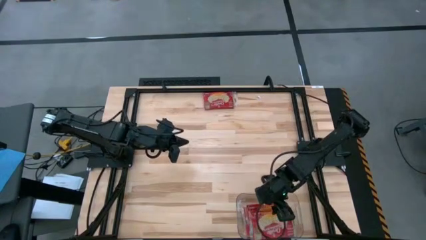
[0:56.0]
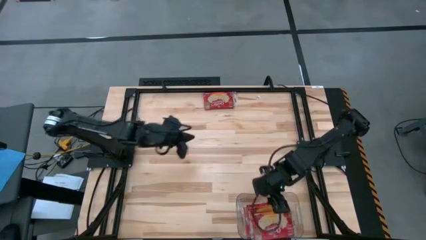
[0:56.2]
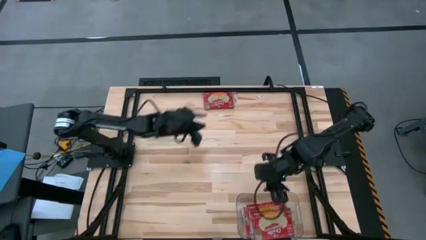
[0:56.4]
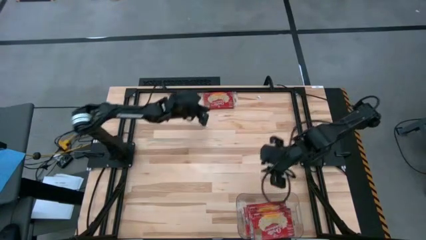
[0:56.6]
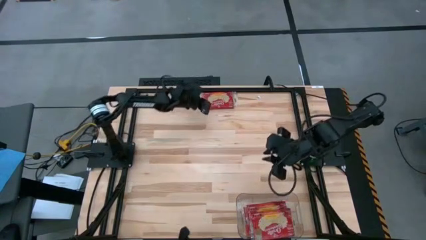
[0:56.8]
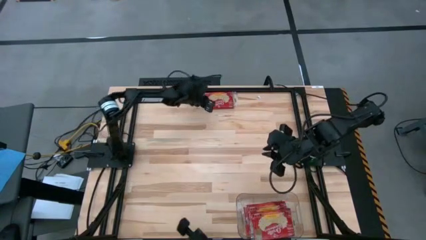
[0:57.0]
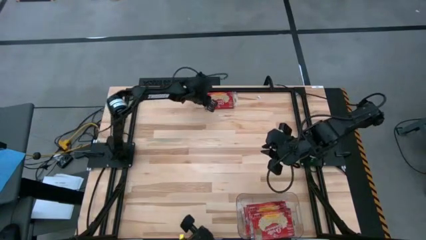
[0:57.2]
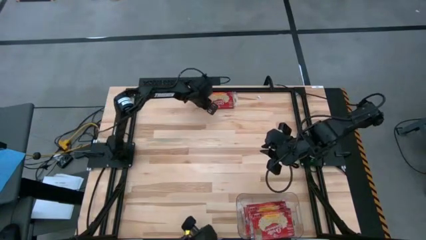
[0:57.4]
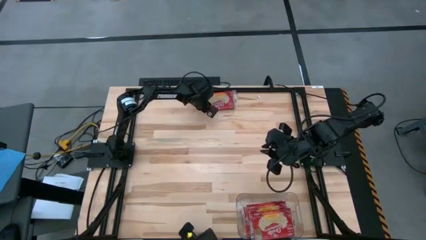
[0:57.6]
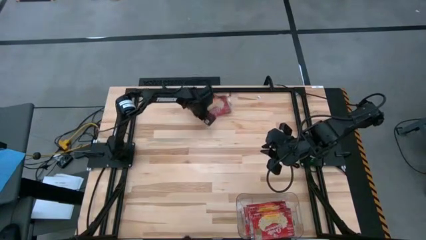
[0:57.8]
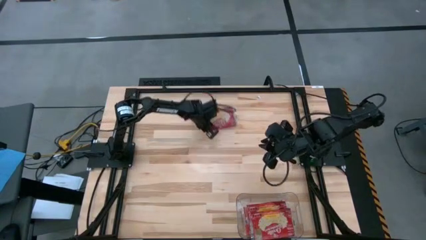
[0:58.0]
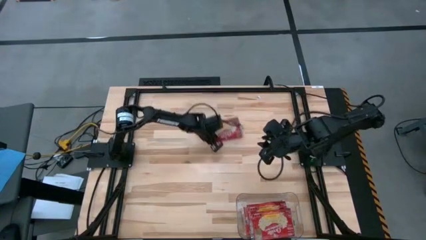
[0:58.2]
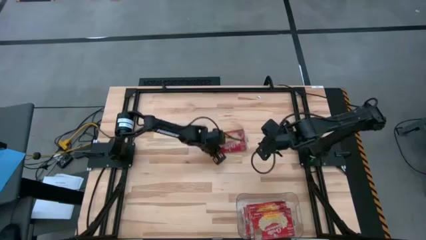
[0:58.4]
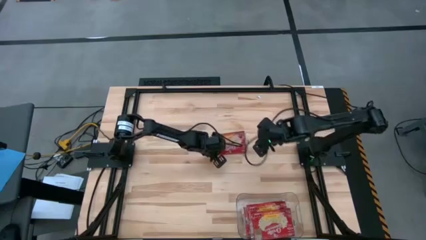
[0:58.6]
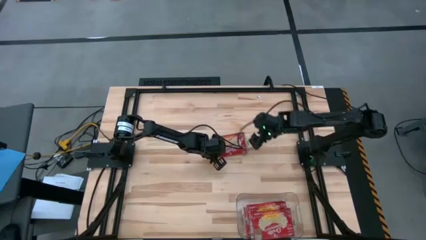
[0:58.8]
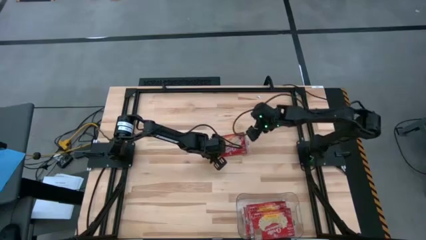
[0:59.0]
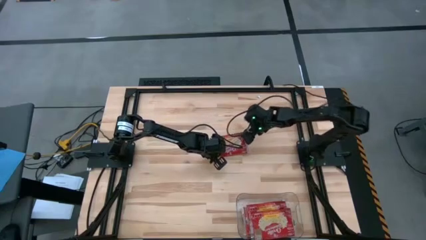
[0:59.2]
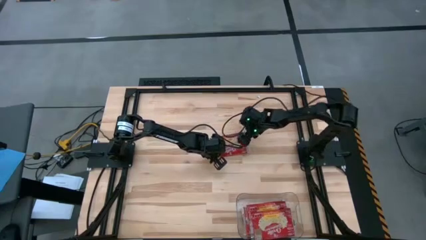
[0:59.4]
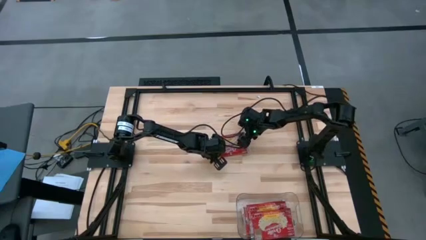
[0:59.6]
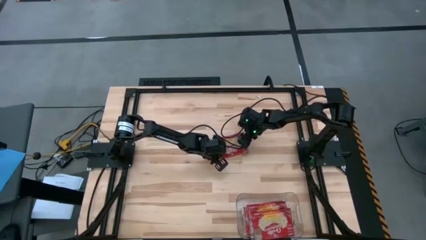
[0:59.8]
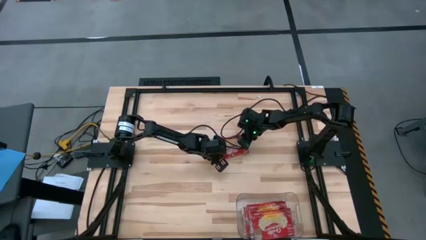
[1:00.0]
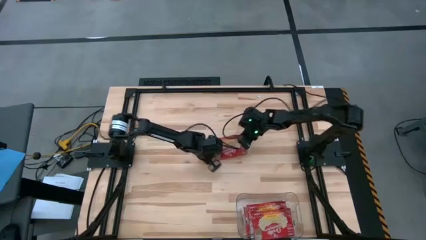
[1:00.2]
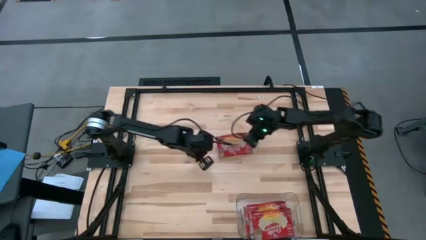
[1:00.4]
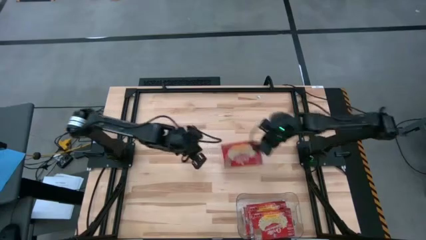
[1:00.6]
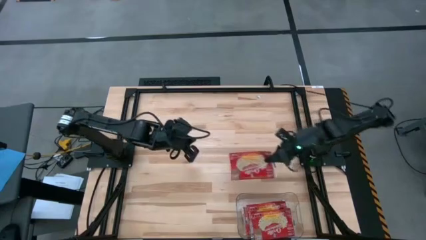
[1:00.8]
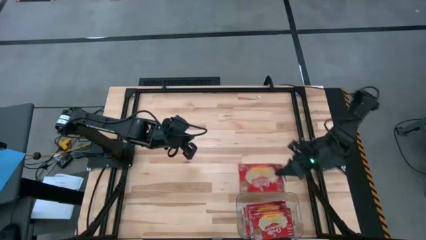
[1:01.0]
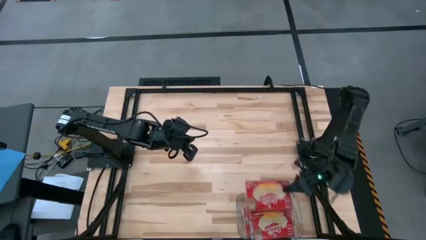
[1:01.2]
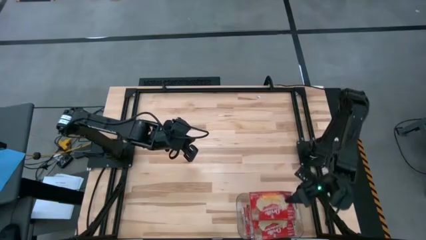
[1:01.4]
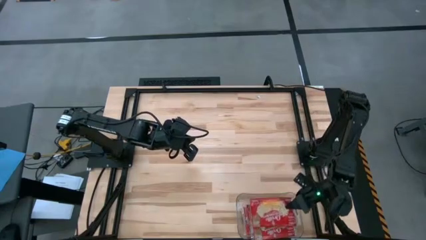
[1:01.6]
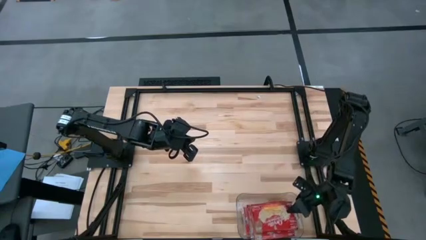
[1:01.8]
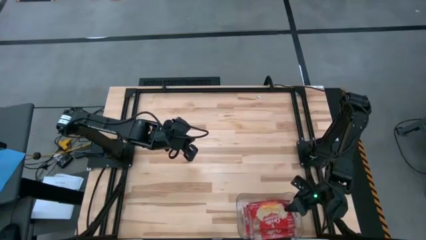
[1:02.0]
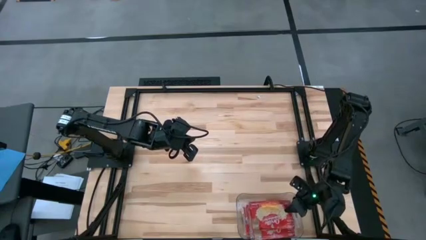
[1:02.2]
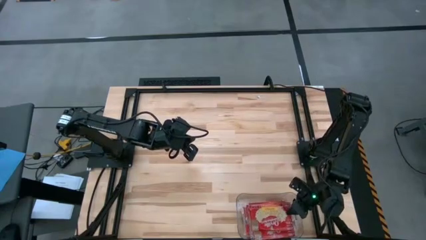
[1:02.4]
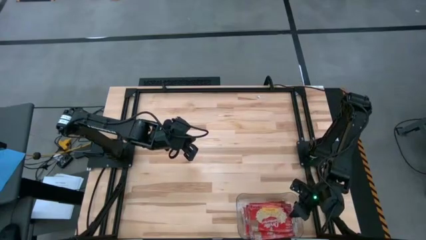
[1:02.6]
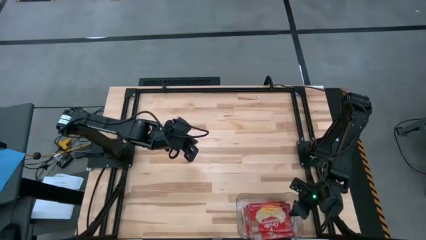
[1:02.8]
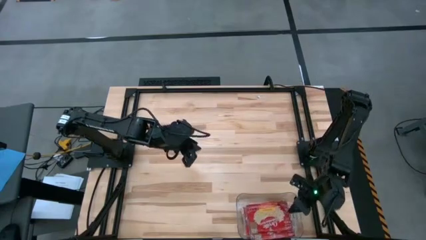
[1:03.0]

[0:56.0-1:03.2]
Task: Sort popcorn bags into baskets
Put the red popcorn bag into the transparent bin

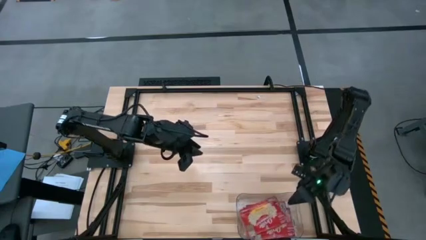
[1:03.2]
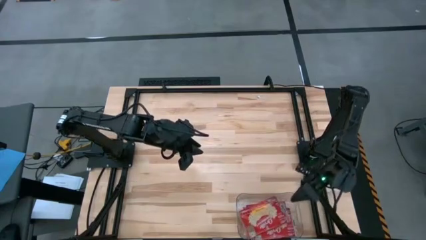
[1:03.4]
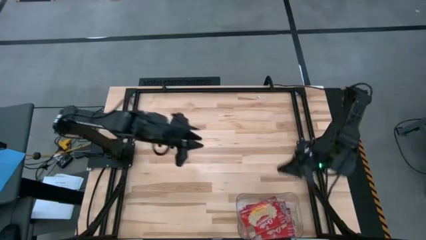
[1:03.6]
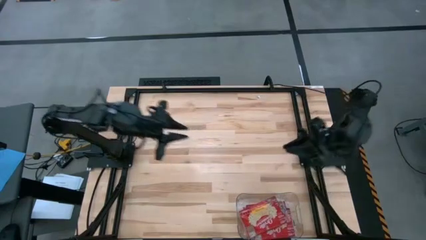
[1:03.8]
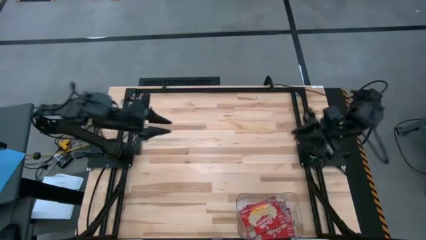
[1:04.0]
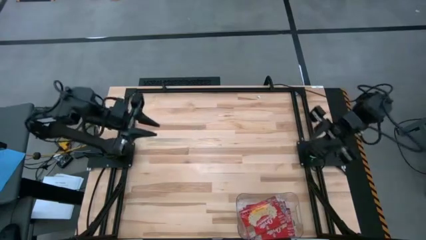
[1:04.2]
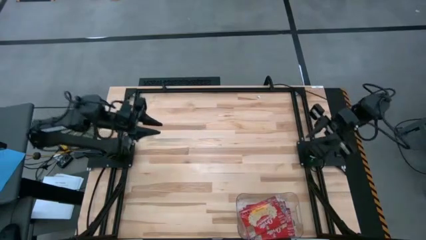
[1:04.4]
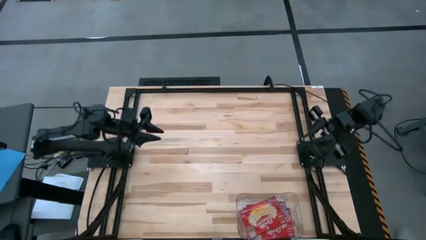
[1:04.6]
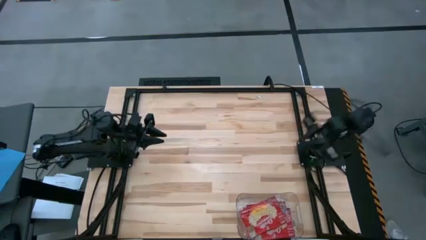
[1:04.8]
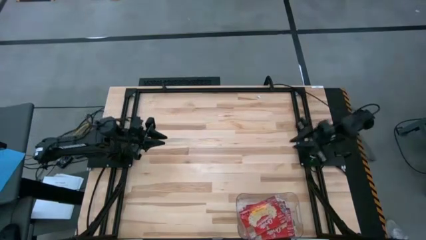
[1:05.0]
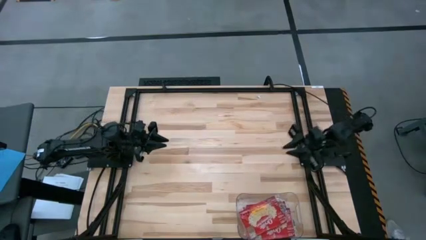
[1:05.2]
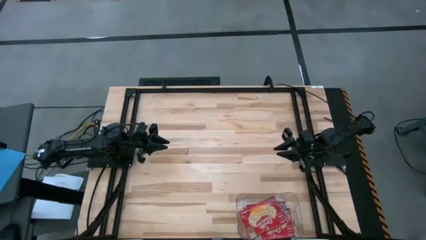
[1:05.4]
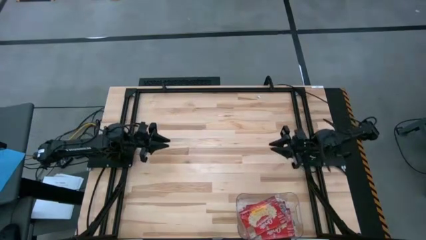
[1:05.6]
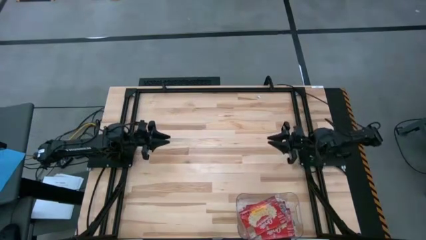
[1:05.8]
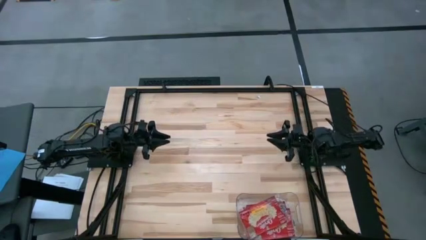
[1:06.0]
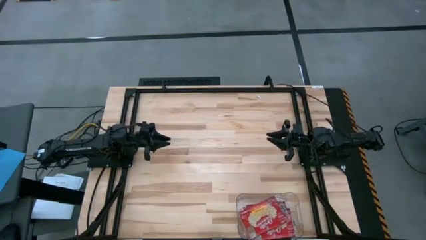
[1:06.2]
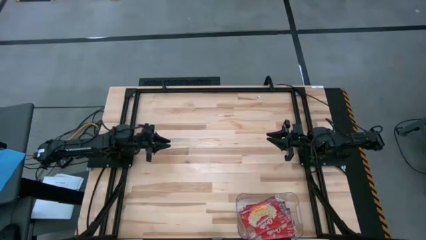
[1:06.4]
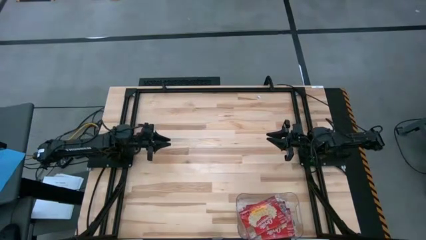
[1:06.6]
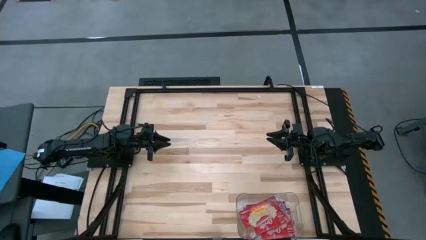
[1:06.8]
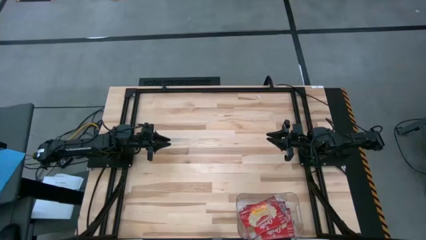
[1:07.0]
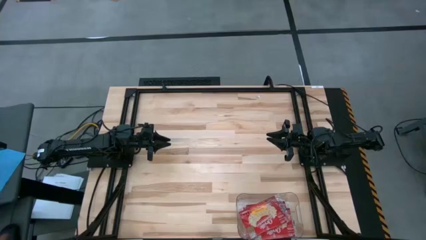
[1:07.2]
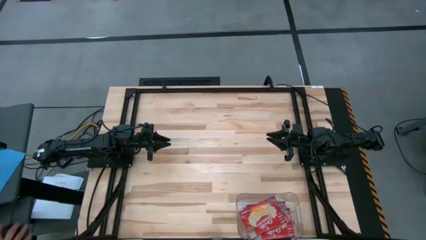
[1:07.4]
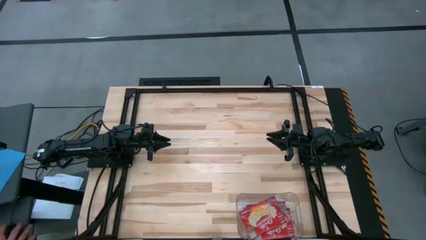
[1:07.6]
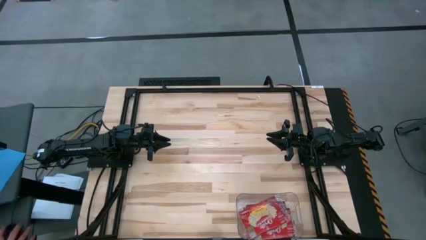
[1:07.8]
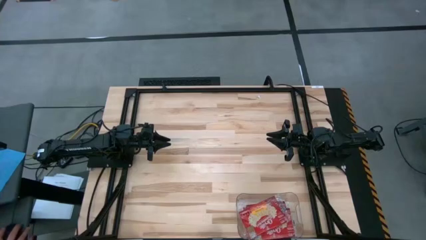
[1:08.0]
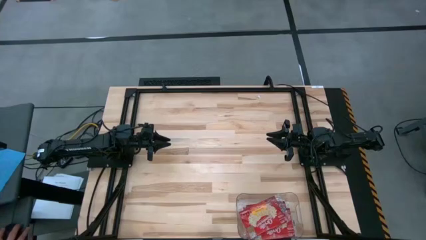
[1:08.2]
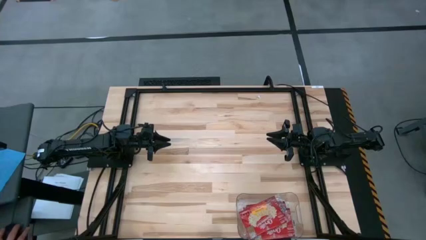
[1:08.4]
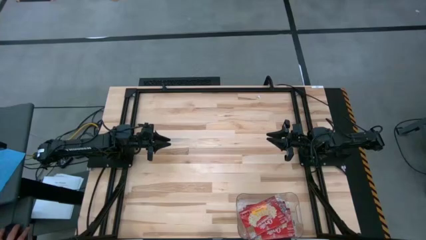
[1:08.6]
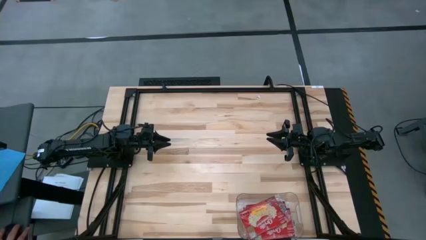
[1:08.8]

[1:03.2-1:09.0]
Return to Home Position

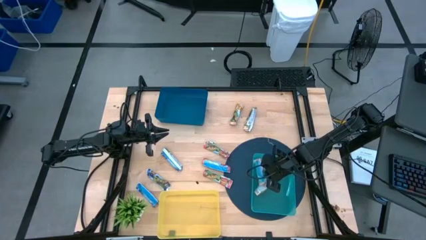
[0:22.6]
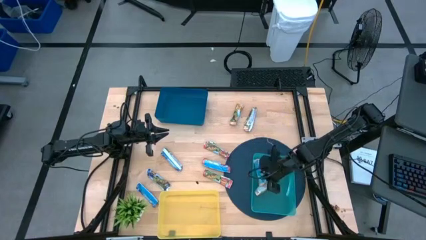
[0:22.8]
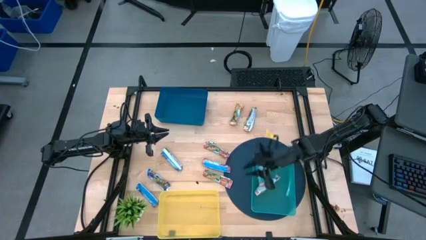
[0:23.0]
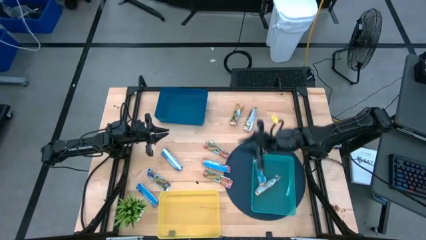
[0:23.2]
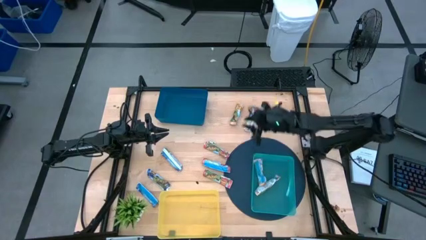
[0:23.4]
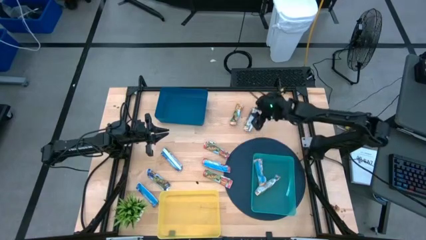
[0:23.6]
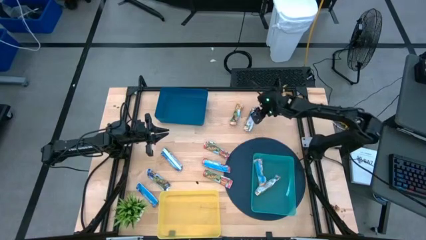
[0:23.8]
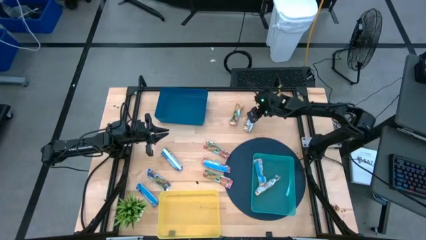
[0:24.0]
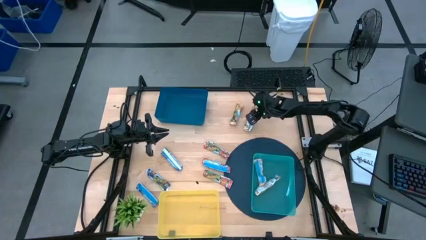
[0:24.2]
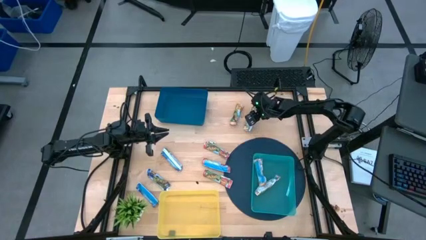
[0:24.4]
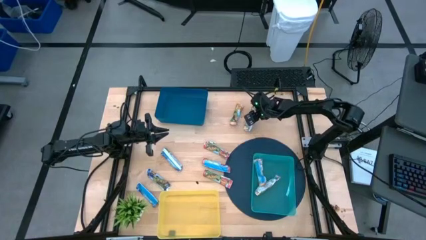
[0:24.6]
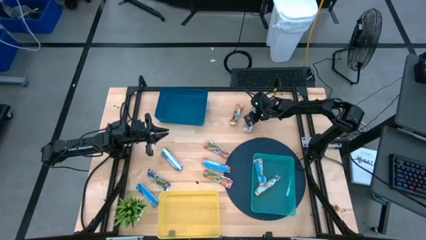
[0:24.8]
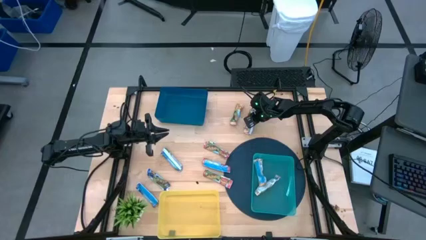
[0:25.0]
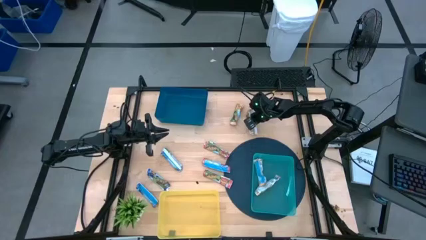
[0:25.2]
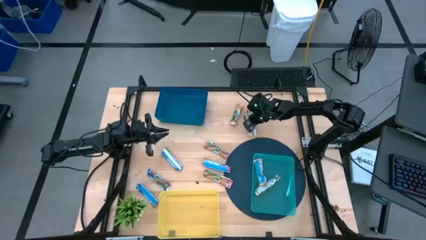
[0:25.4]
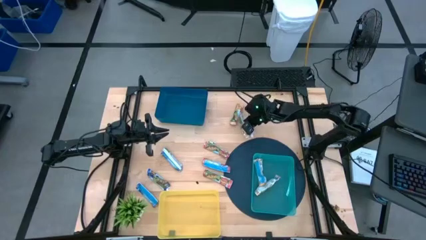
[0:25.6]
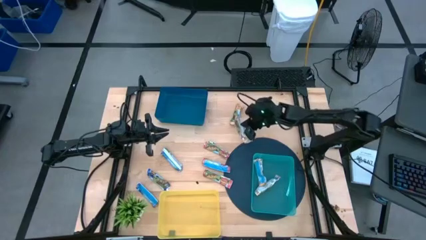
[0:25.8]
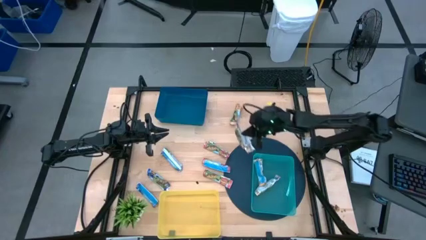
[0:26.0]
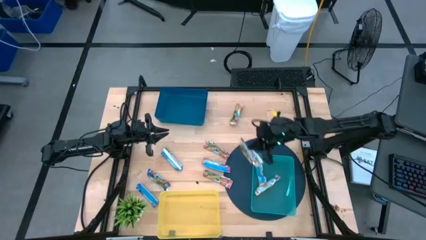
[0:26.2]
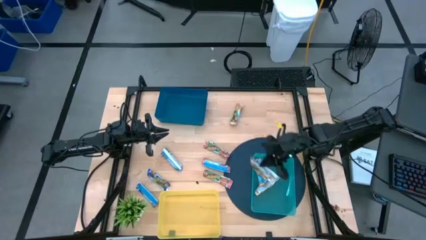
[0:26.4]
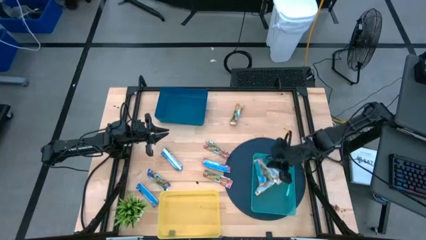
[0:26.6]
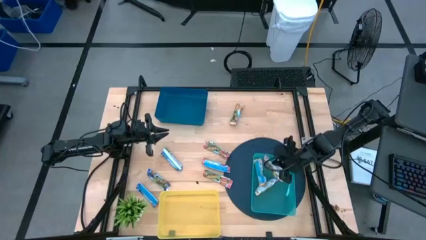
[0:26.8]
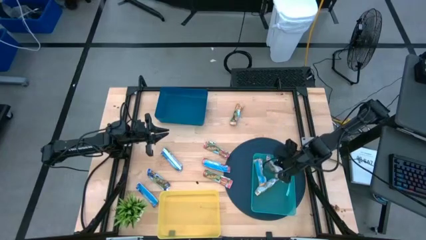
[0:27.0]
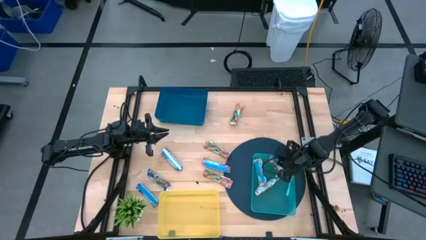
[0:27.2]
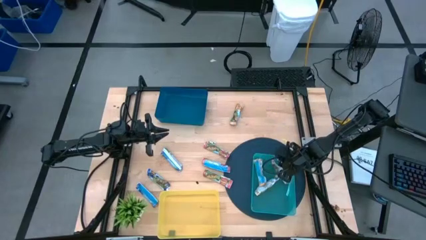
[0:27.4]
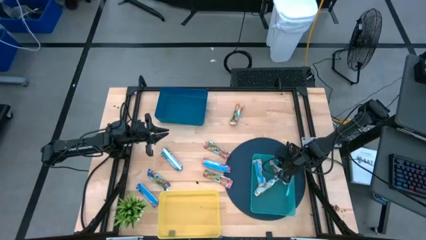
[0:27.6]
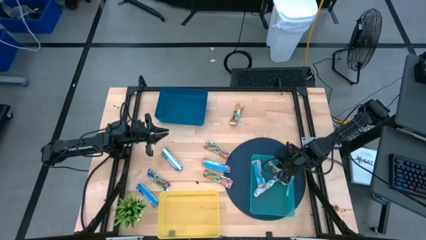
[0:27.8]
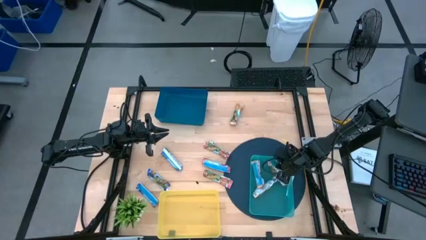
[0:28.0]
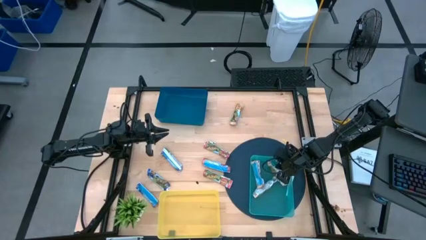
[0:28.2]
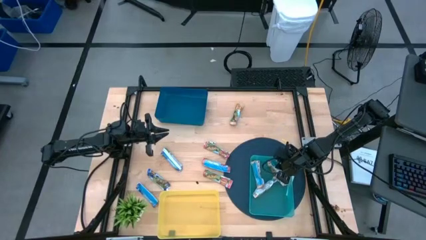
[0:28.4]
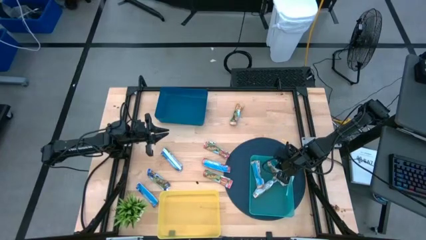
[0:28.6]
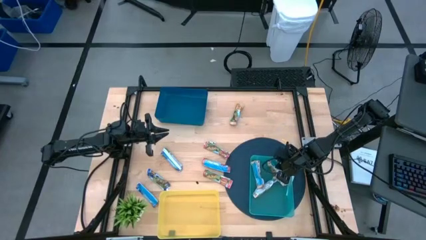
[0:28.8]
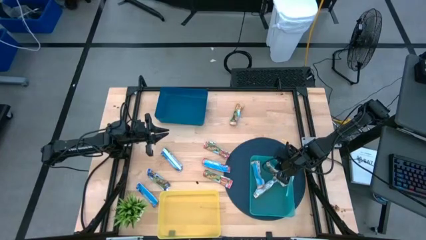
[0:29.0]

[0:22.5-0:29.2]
Task: Pick and place Granola Bars by type
Put the right yellow granola bar into the green bin
